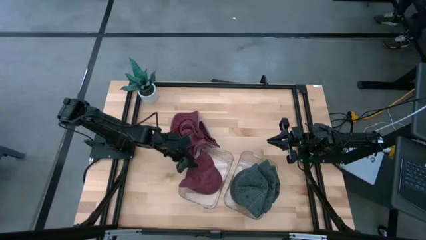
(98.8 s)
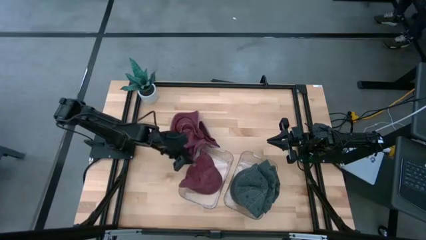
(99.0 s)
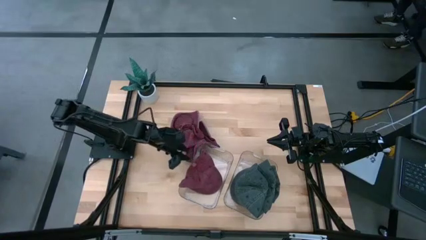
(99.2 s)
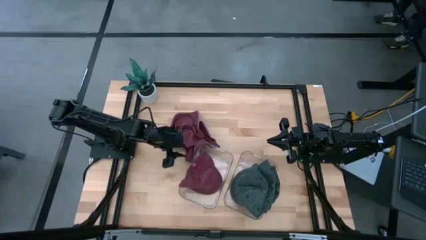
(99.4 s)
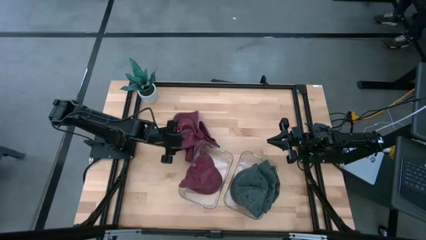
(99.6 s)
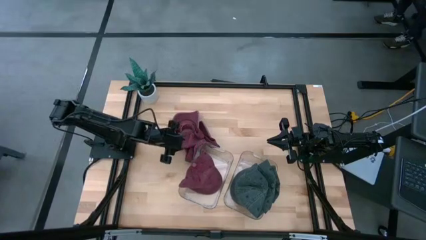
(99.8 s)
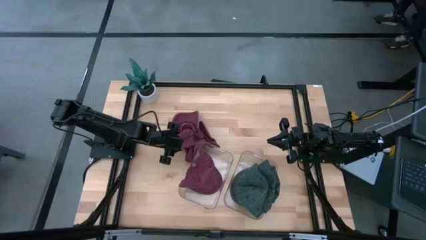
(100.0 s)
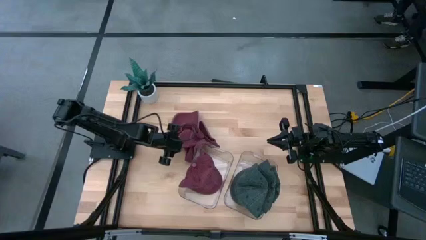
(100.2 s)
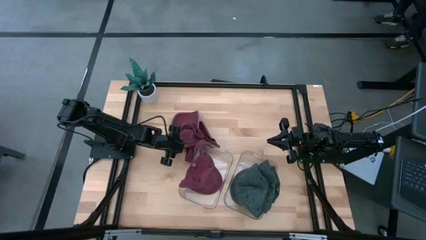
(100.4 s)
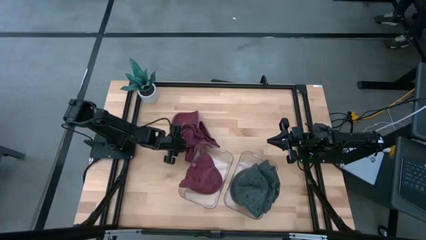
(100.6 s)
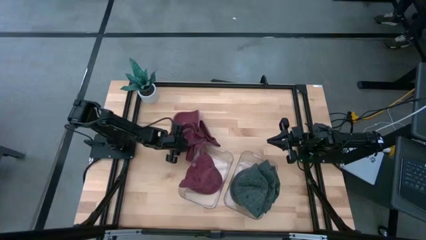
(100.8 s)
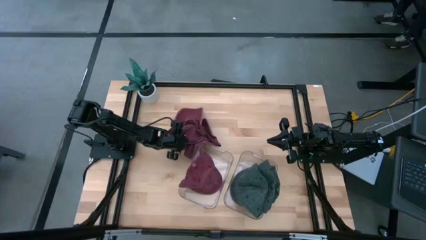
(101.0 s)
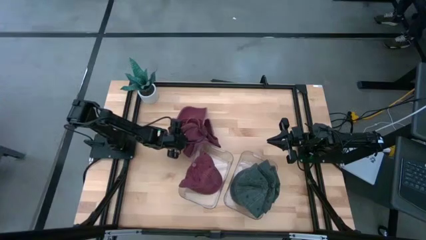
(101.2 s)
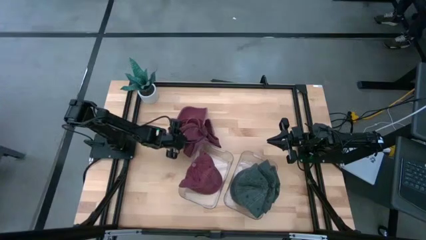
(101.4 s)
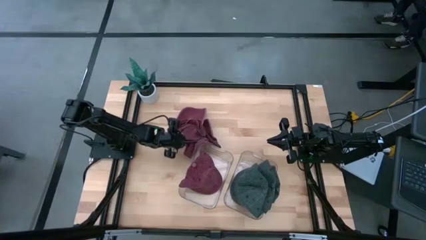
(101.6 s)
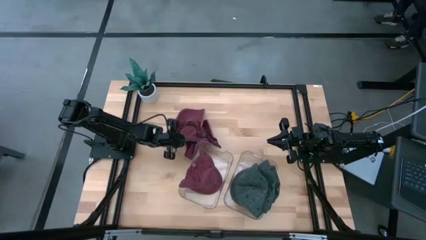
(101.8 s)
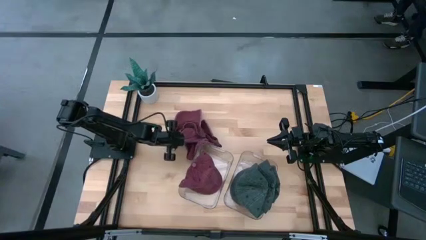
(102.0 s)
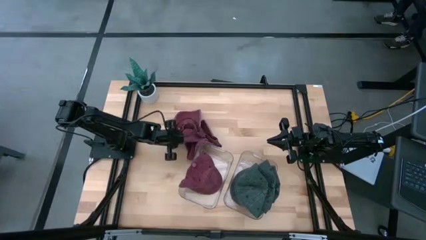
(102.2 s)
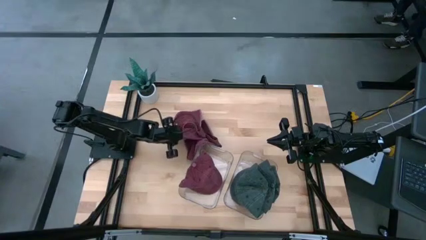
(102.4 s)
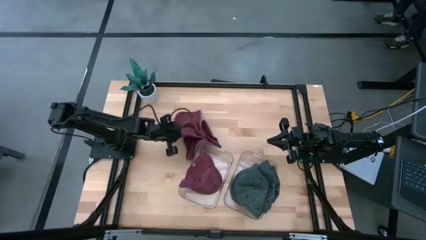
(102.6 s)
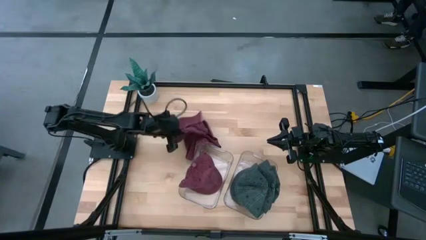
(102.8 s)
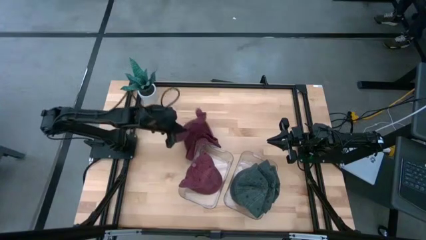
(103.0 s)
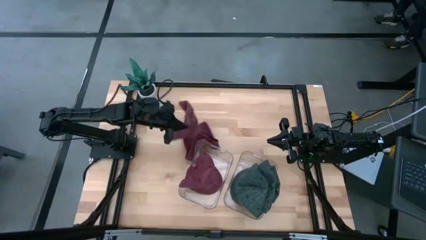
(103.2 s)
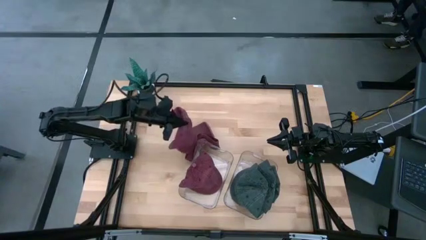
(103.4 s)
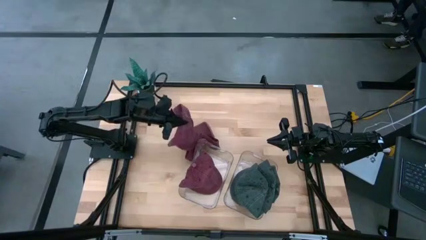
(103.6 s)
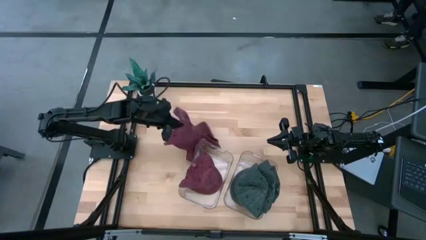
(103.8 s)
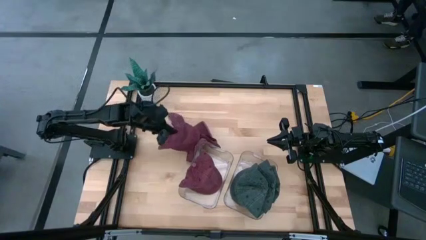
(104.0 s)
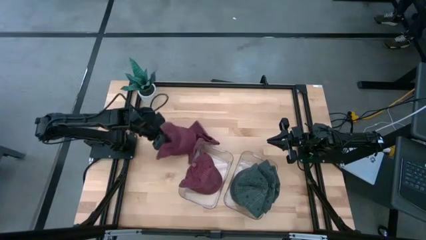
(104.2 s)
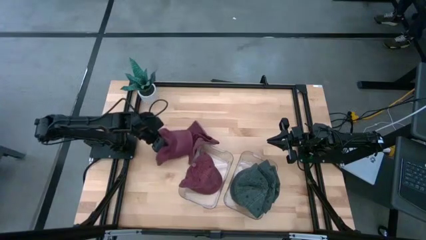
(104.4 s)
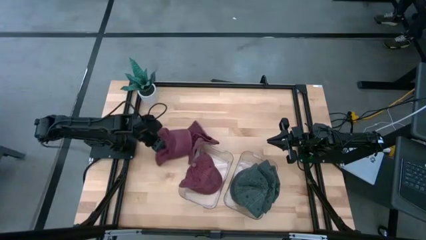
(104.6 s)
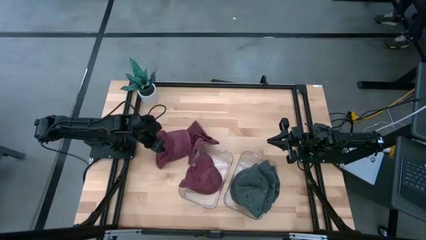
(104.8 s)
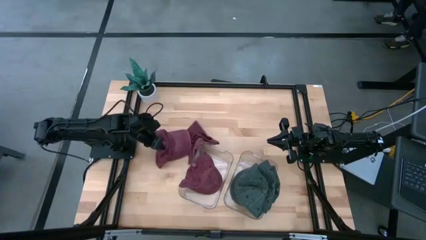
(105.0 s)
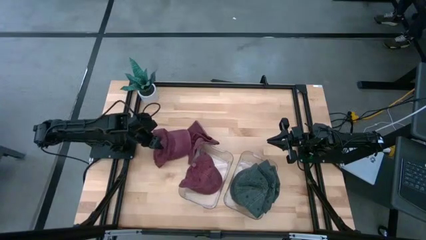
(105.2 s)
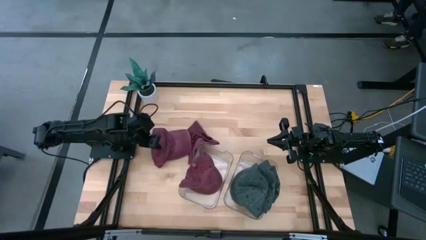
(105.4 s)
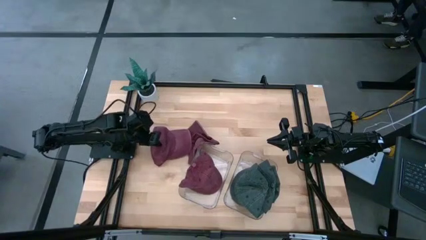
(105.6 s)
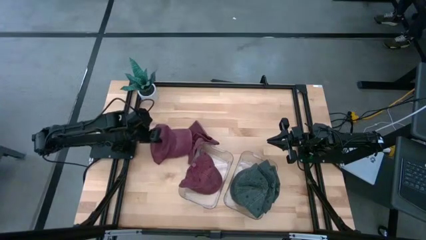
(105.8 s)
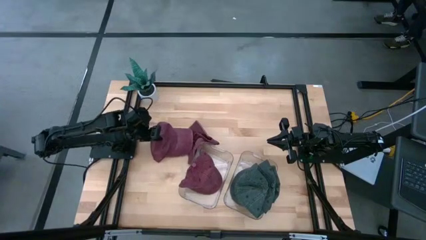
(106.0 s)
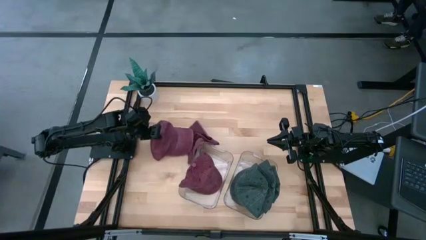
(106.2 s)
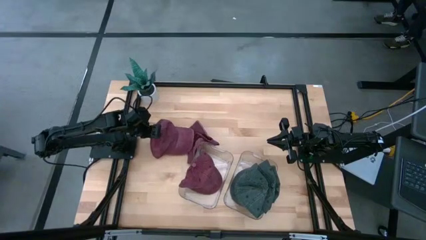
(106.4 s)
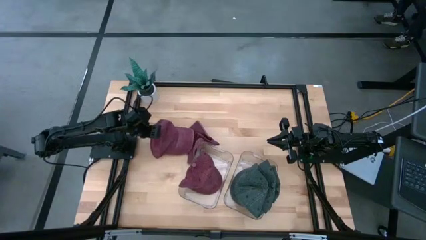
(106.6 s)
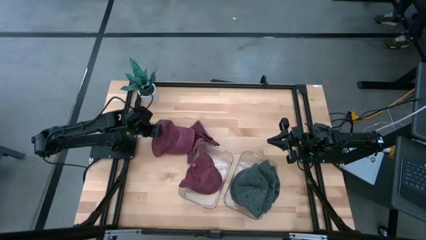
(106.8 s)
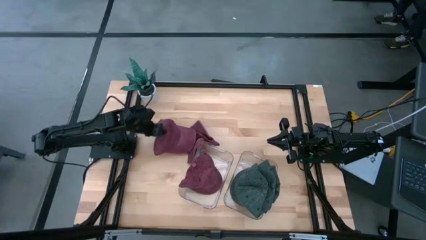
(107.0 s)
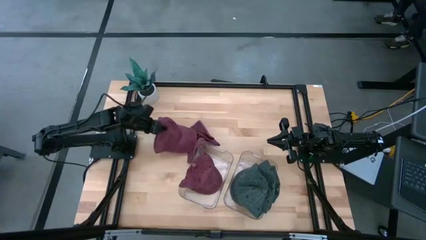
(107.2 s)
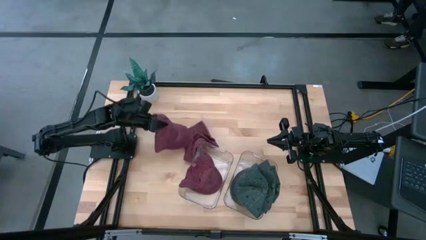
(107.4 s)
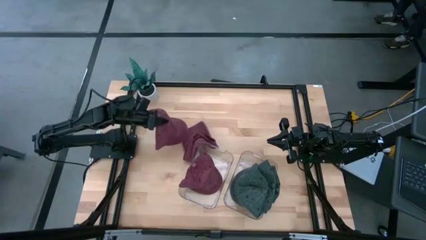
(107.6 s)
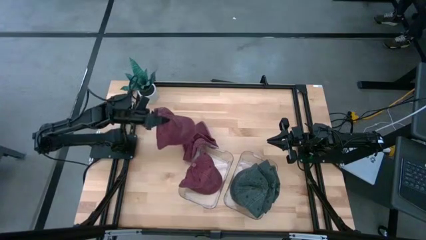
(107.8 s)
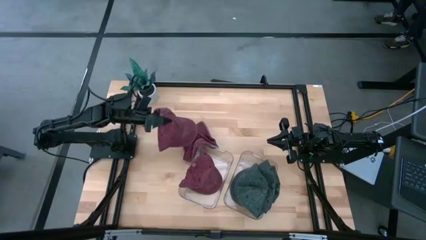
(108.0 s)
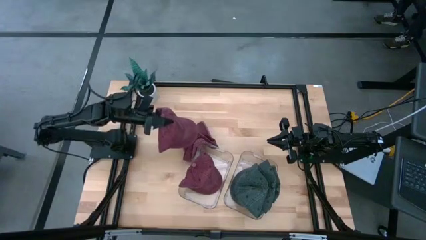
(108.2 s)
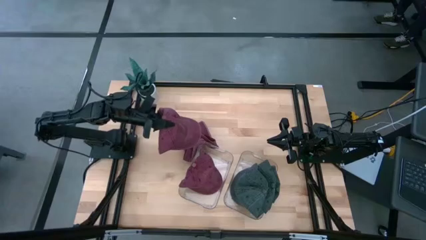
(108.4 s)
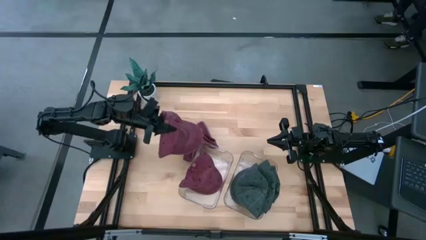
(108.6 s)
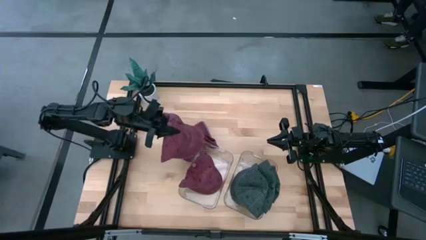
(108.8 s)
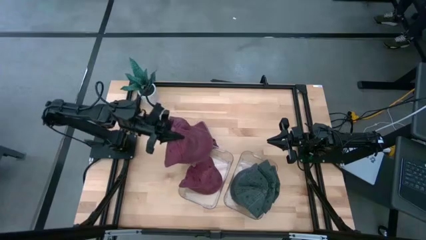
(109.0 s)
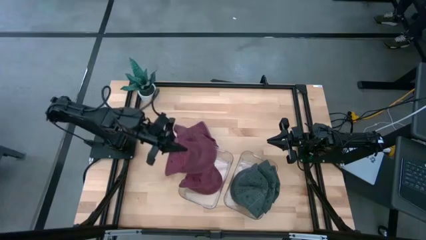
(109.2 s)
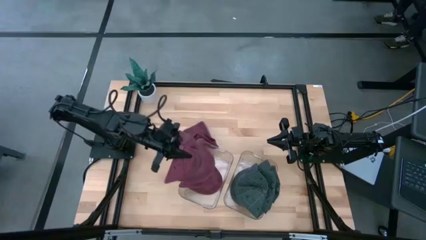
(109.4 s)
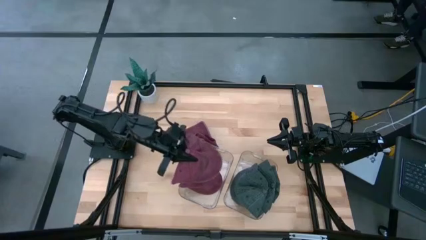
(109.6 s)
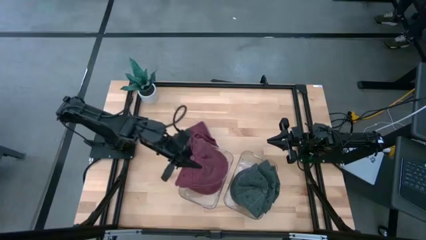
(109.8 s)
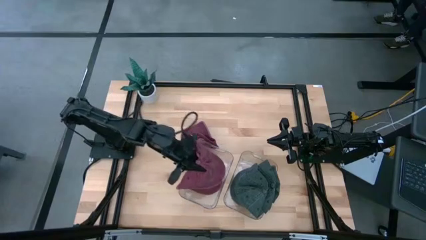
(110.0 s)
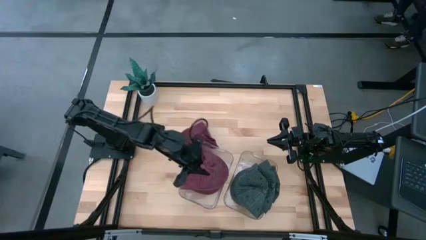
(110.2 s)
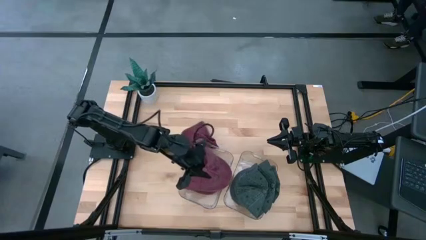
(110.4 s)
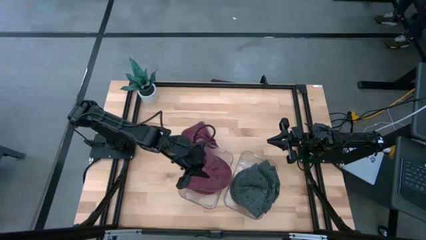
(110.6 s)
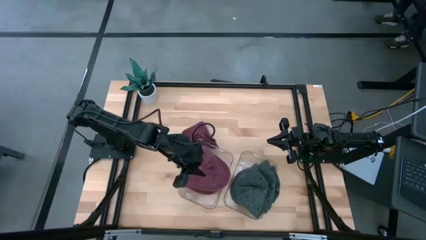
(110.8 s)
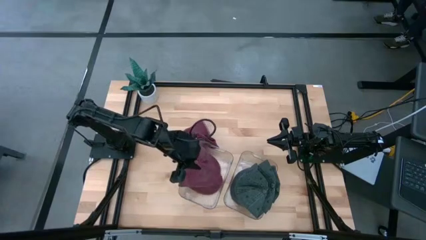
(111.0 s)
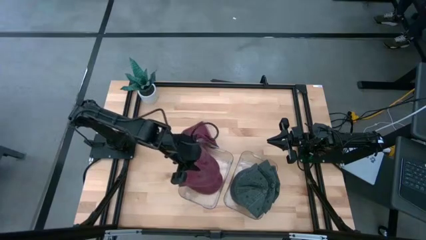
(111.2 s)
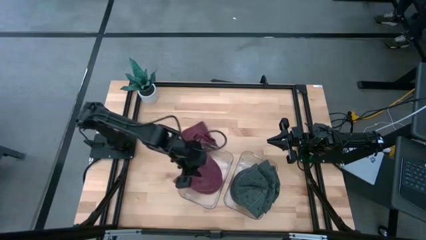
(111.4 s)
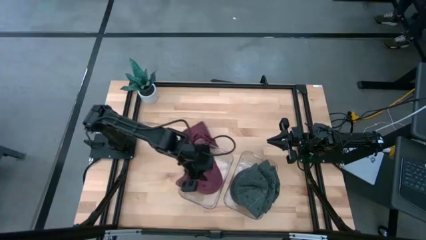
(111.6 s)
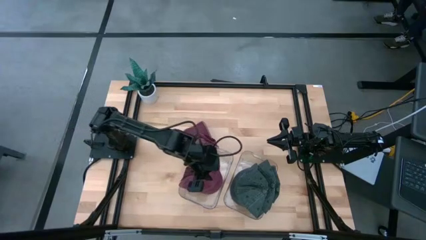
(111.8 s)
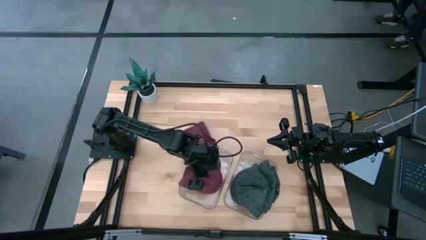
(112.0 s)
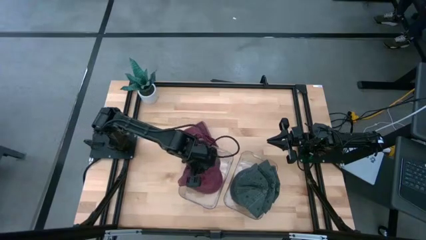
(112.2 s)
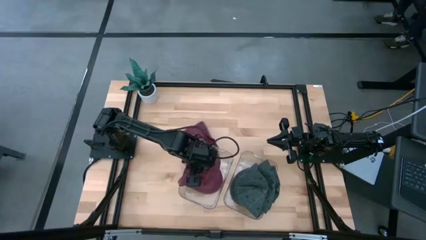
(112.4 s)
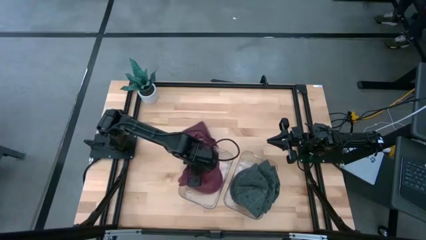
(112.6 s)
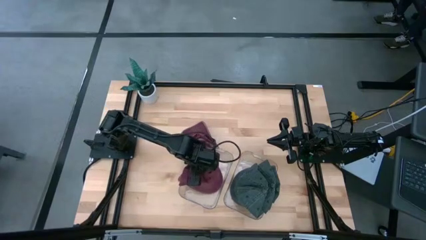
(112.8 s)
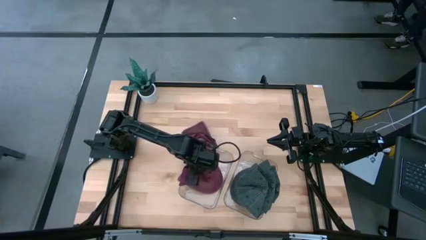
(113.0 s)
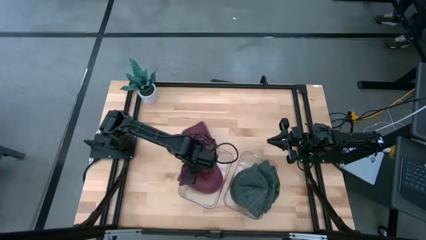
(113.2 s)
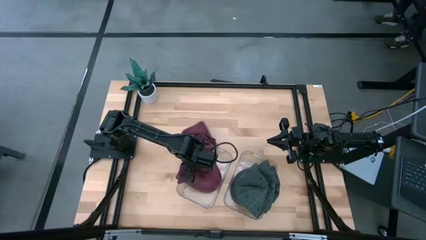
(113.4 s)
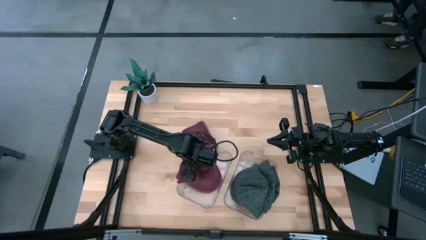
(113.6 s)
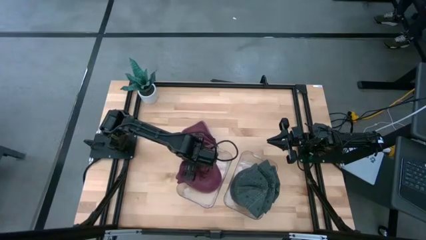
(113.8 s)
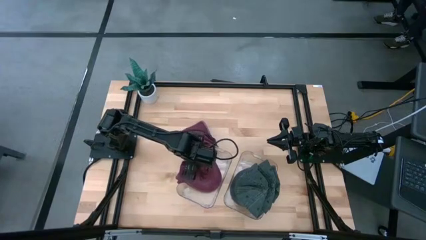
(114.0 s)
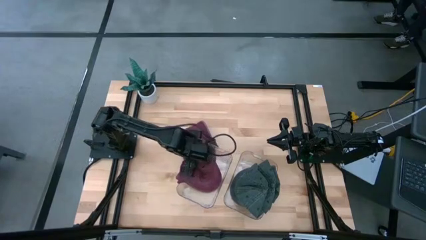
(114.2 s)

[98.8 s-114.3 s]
Task: Pick & Place hat
Put the top red cap into the left transparent bin
